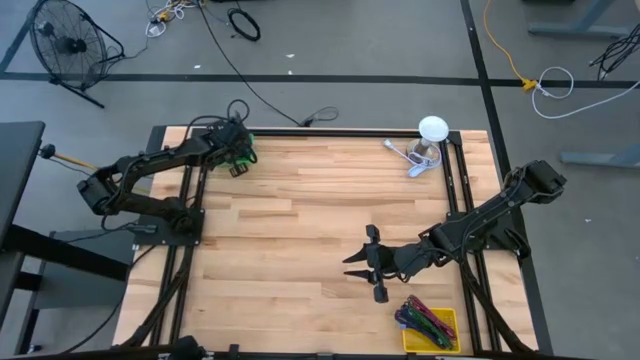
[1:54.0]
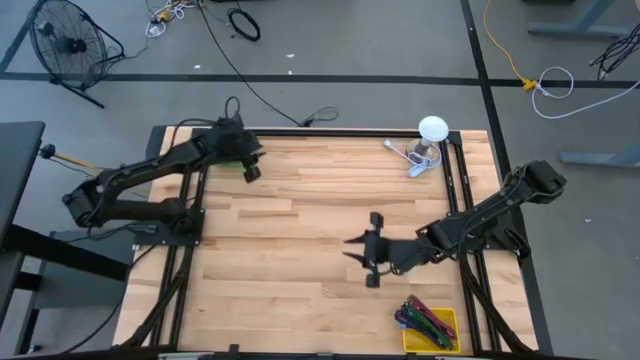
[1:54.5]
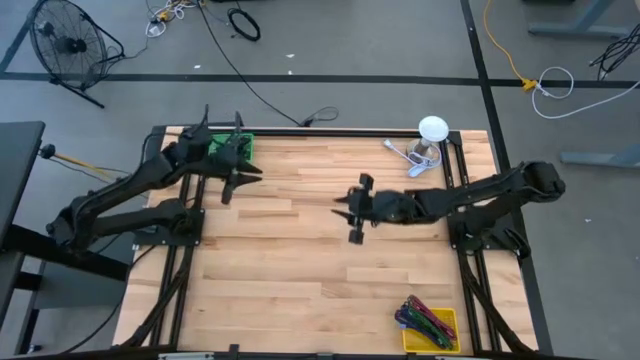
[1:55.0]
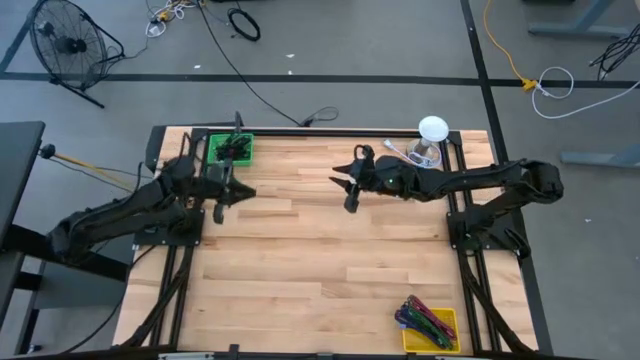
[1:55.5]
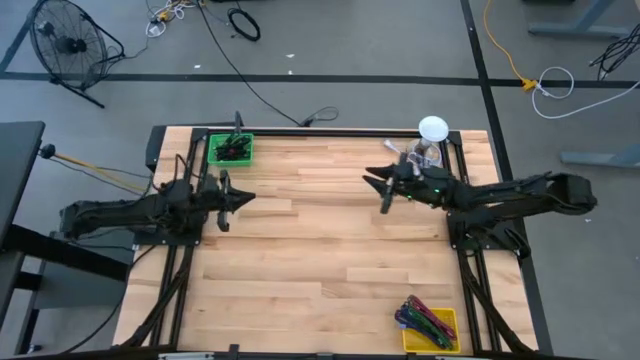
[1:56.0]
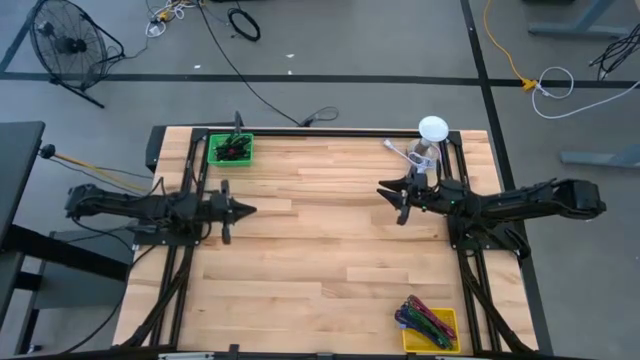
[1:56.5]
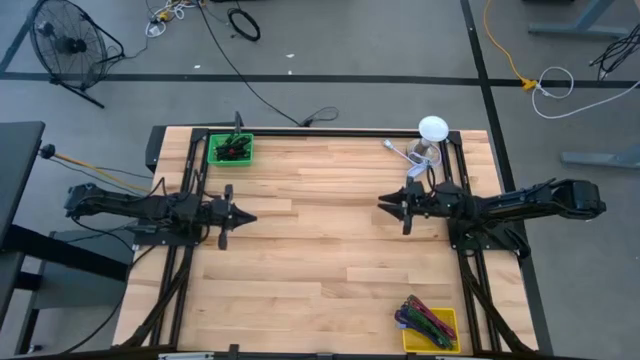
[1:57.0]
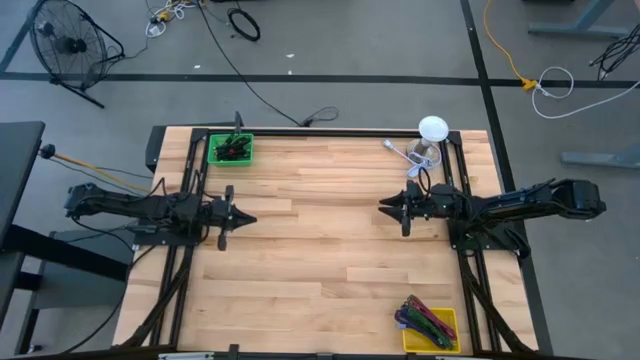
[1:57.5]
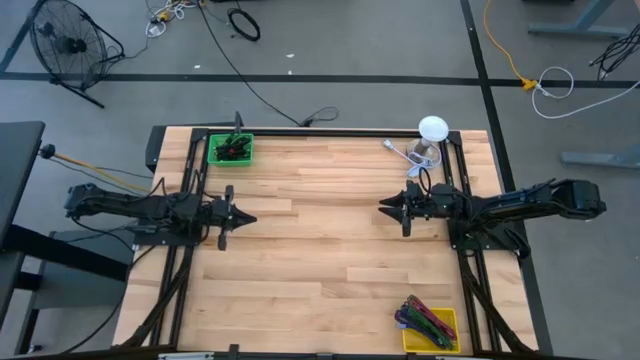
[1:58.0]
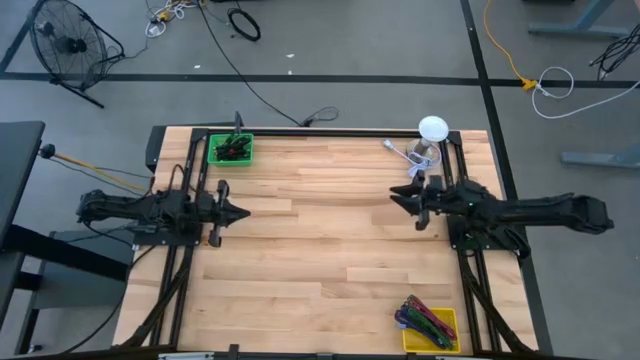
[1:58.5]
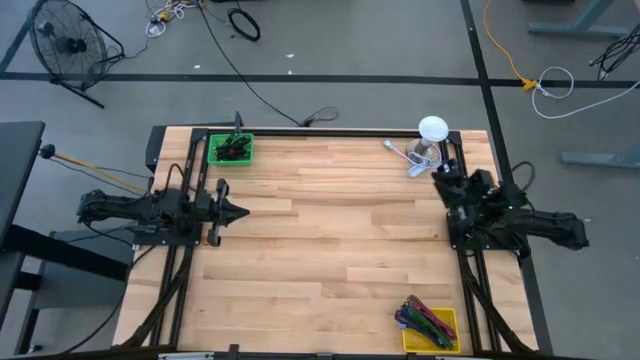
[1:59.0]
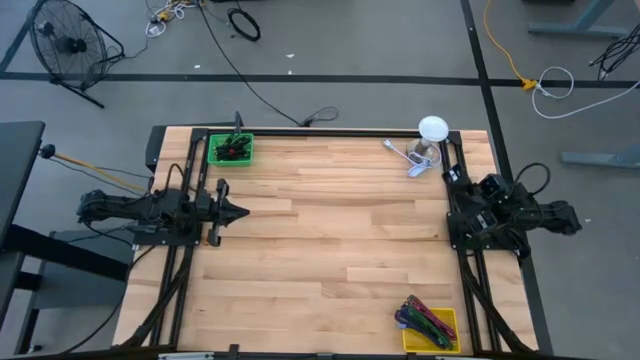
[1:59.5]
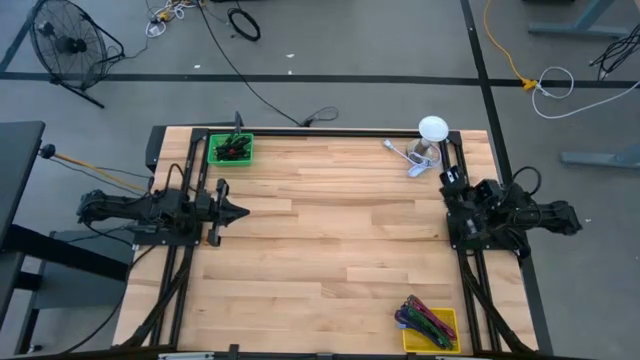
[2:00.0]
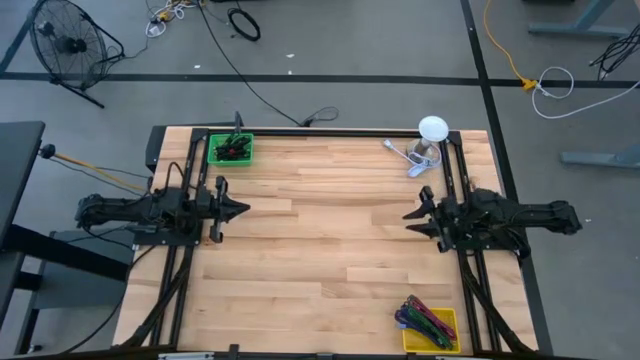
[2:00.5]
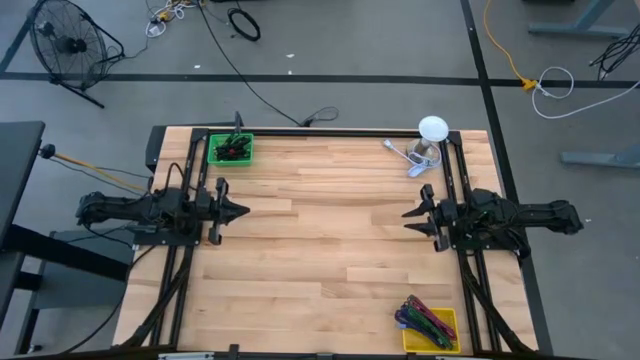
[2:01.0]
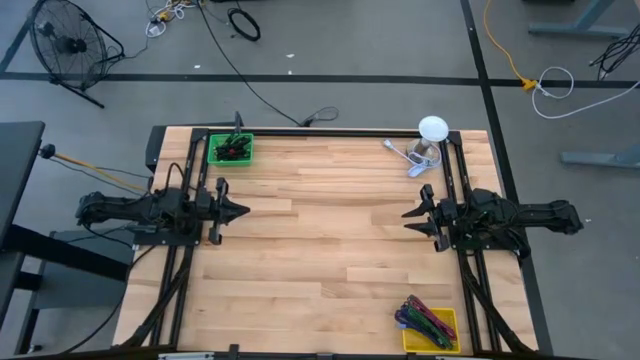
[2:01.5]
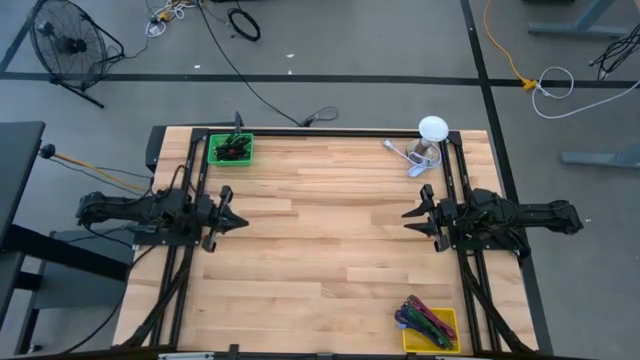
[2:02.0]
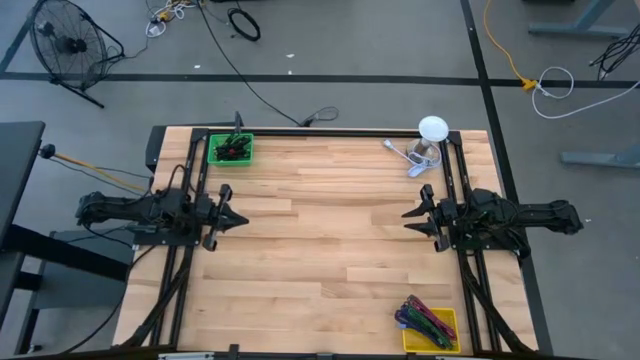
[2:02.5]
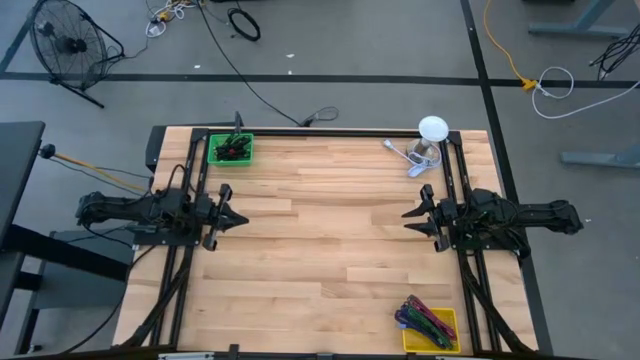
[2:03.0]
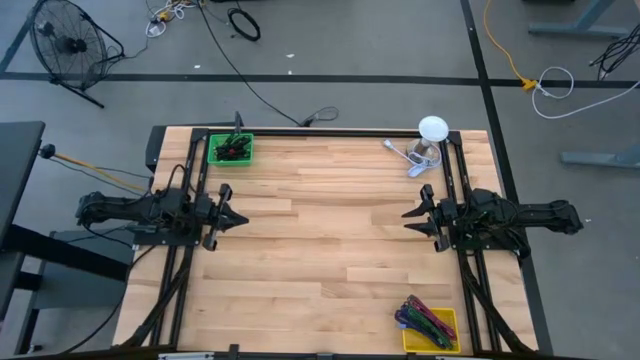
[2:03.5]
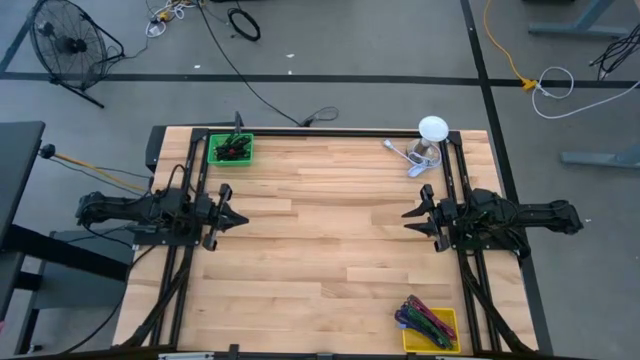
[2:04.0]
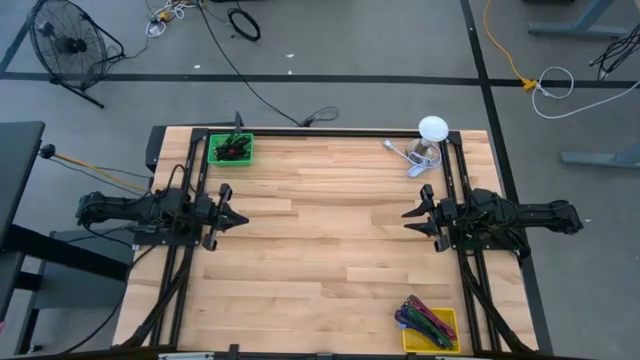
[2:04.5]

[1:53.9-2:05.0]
Task: Pick & Place USB Port
Return to Home Position

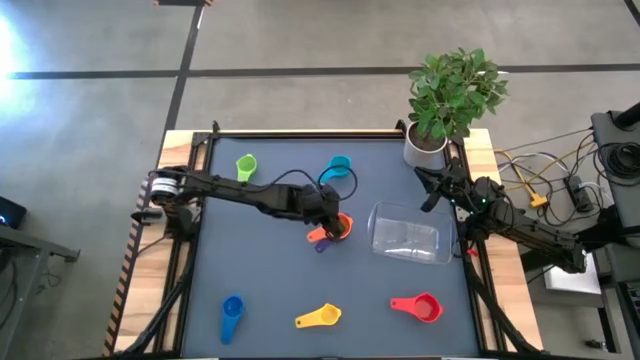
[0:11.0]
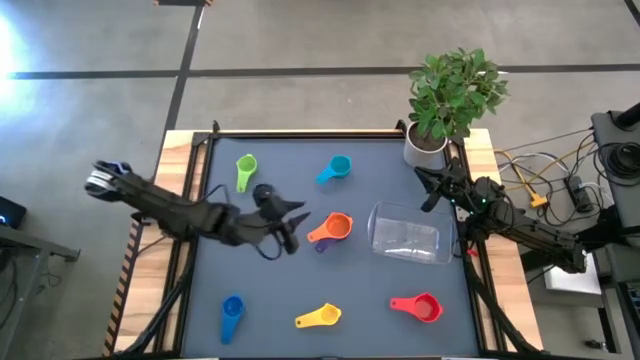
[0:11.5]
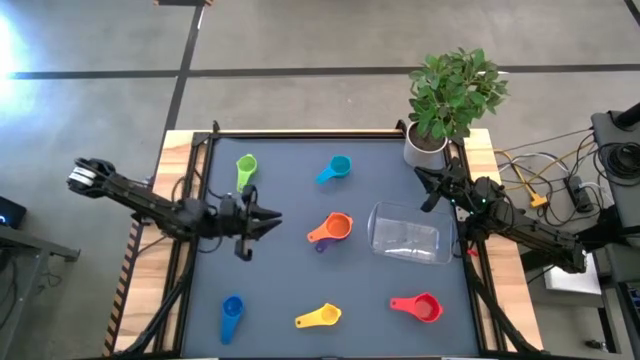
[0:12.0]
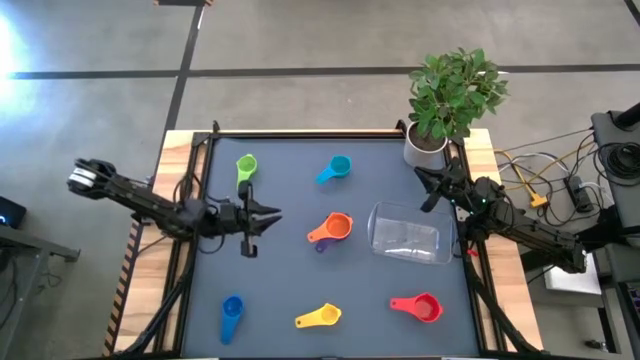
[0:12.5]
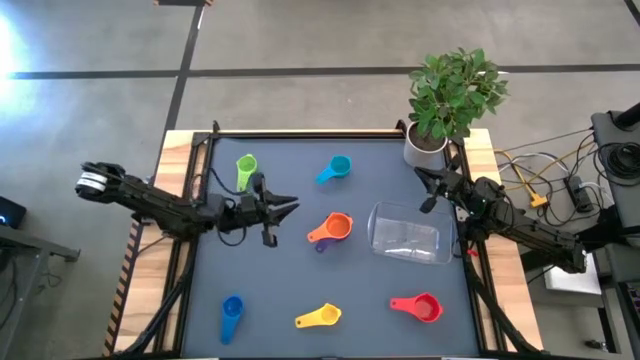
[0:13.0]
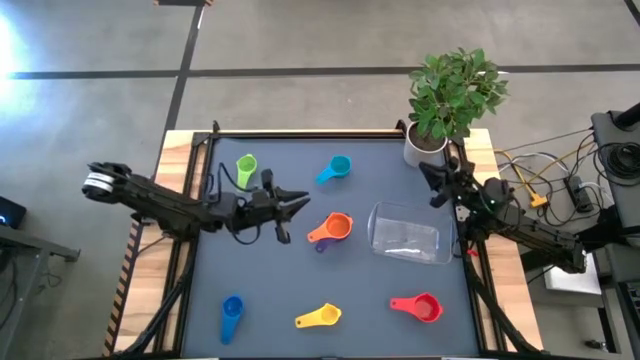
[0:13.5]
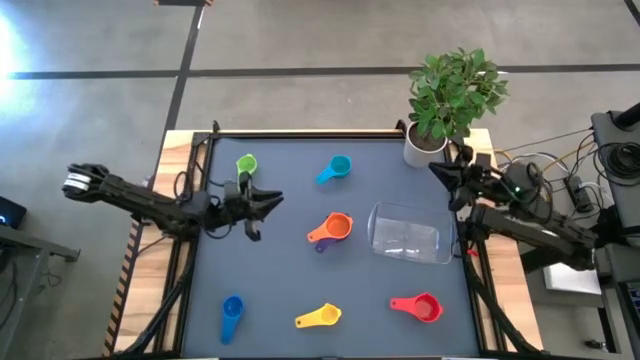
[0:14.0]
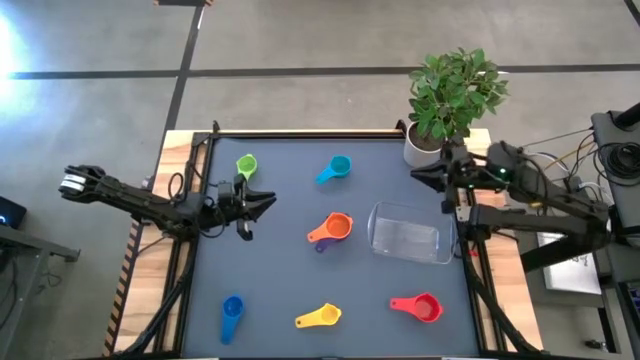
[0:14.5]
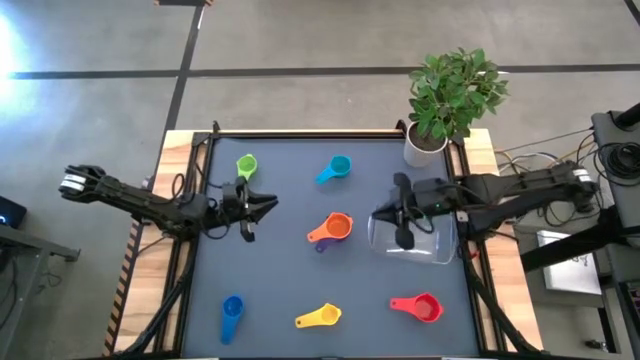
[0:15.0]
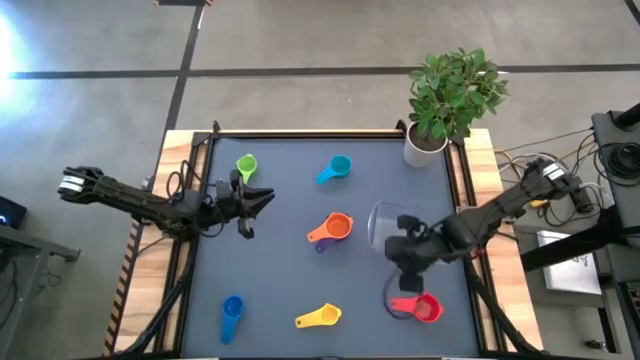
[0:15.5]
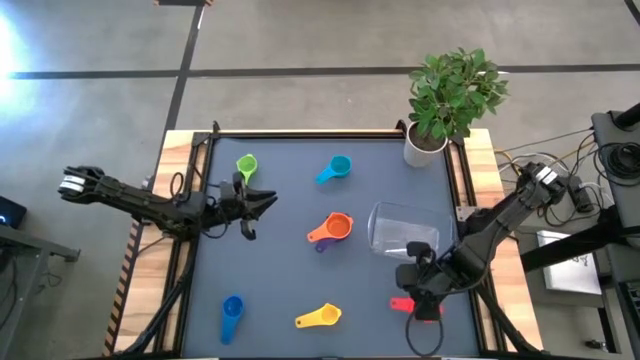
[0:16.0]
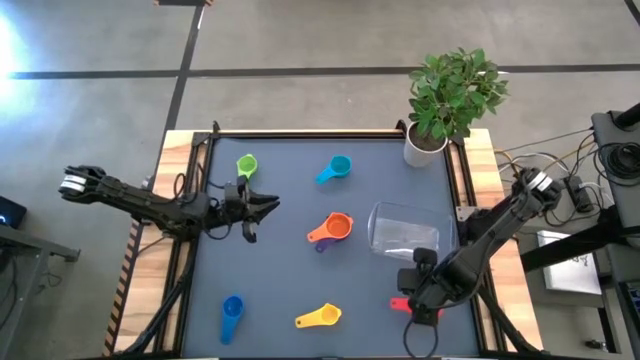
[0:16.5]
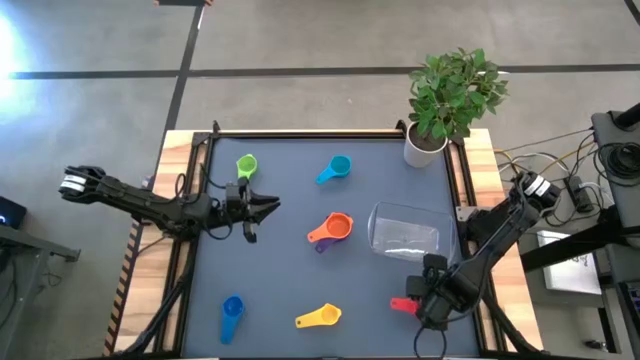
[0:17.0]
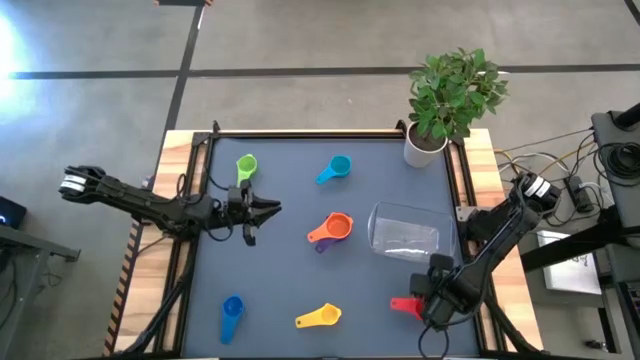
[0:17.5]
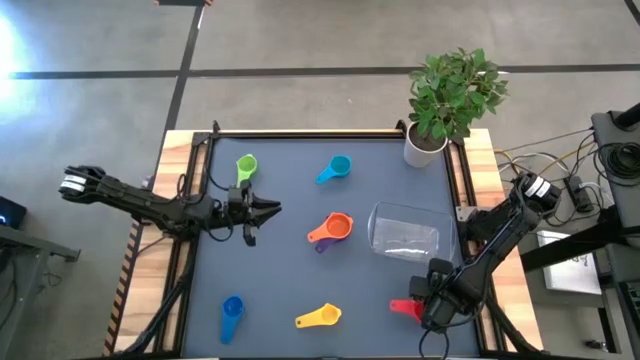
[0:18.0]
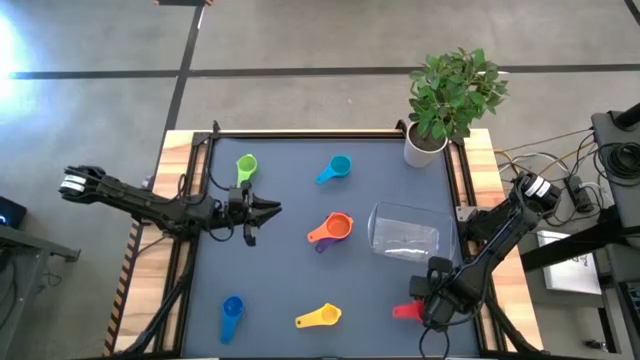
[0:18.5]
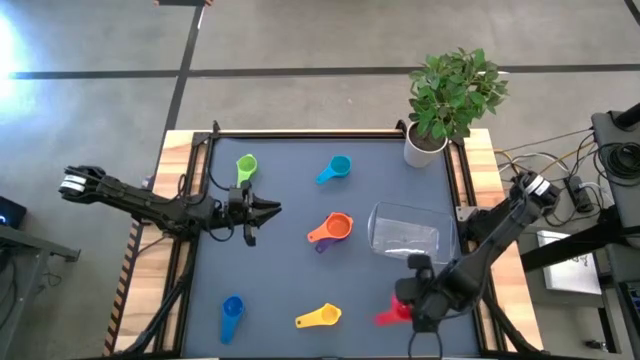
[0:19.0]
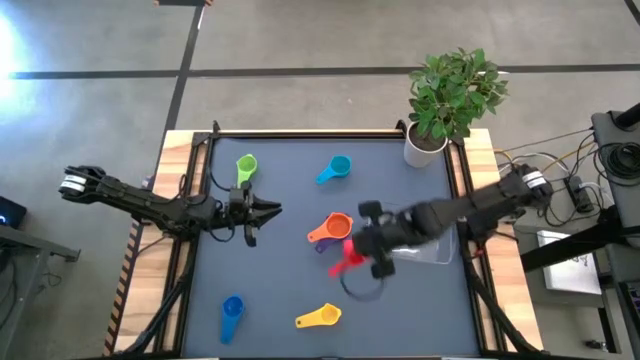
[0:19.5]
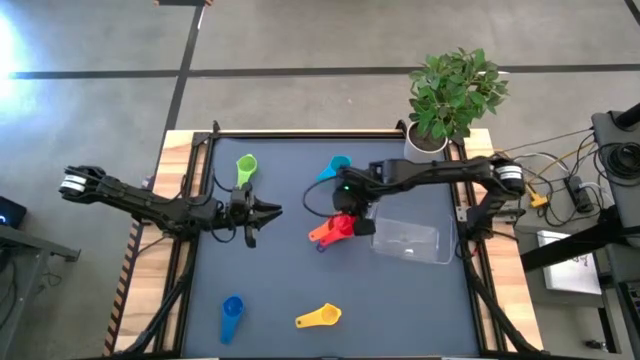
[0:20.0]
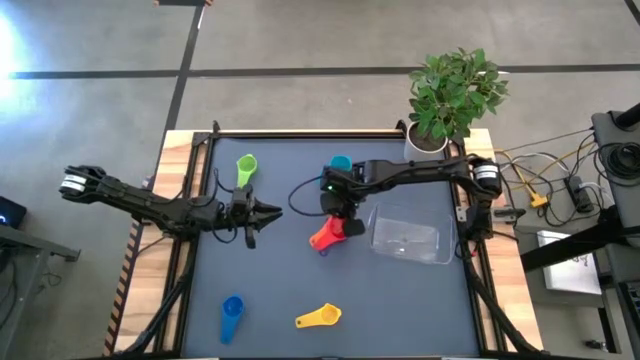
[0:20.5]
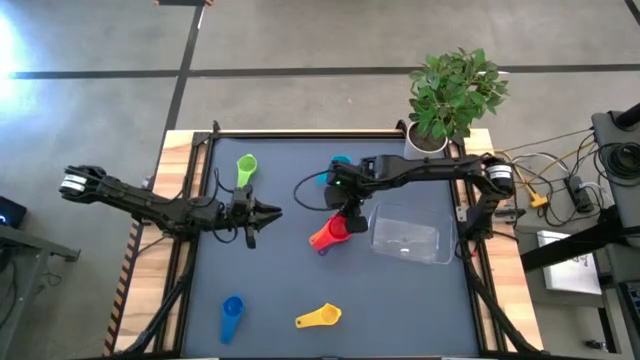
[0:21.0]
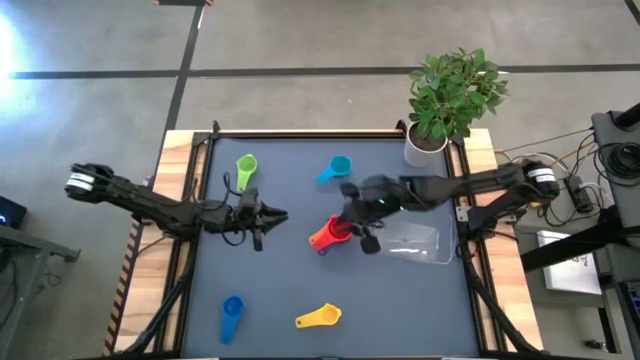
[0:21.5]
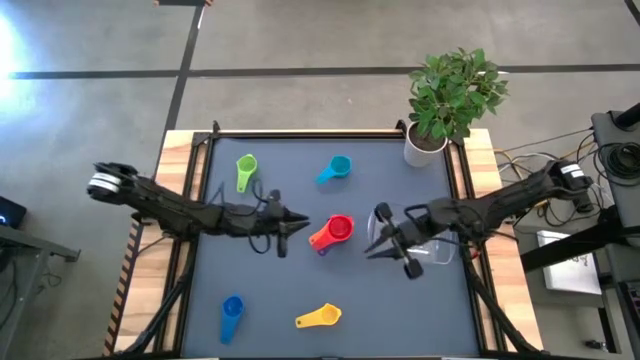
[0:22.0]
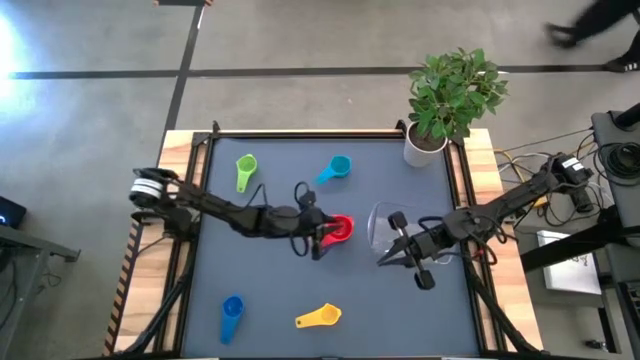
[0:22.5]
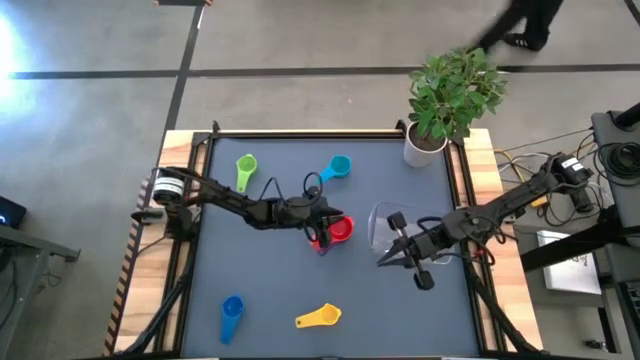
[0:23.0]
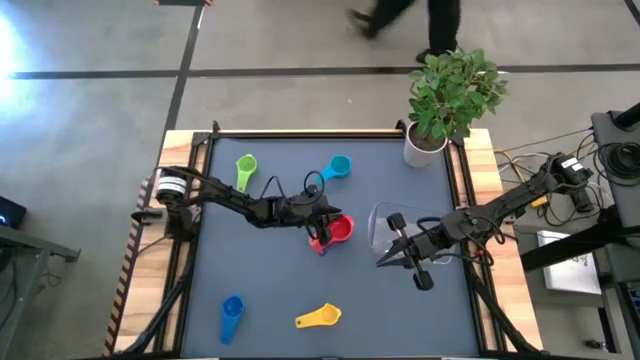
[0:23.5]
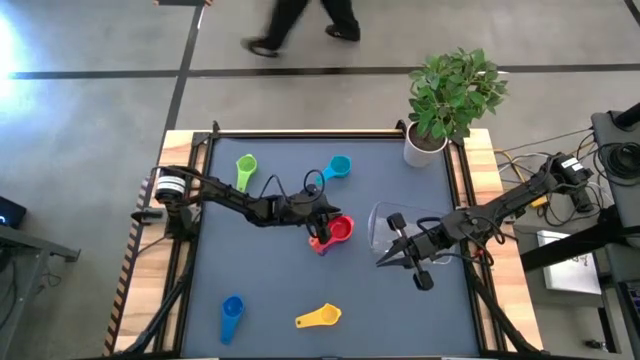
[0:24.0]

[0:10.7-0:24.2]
Task: Nest measuring cups in basket
Stack the red measuring cup on the orange measuring cup
